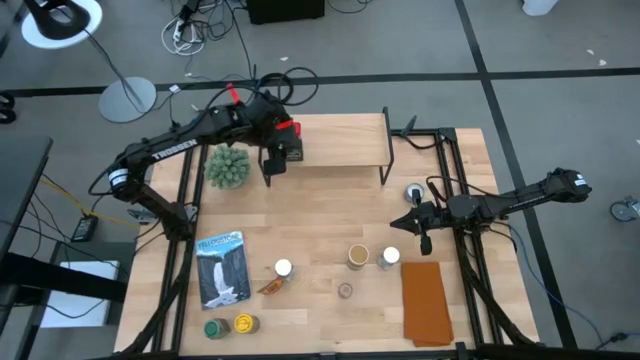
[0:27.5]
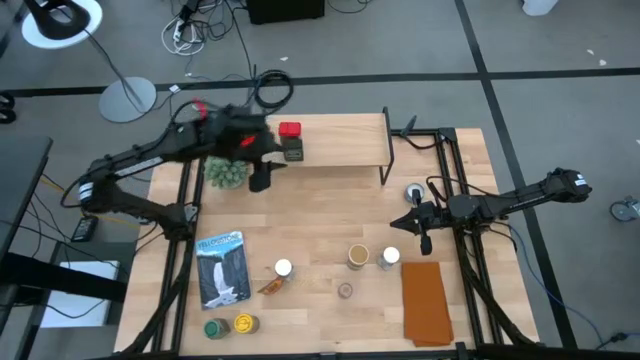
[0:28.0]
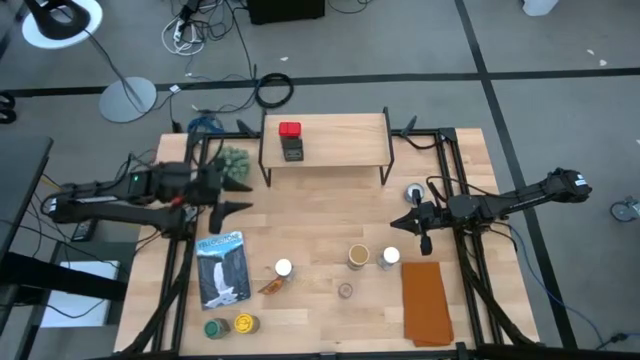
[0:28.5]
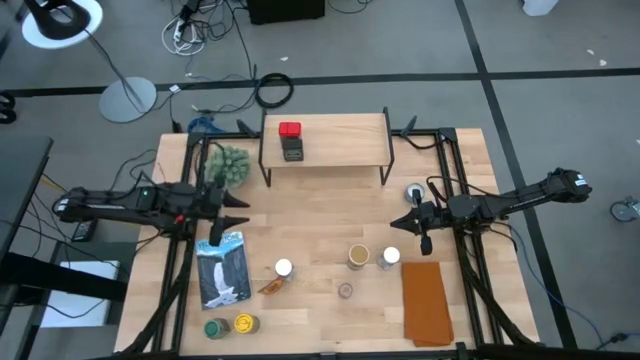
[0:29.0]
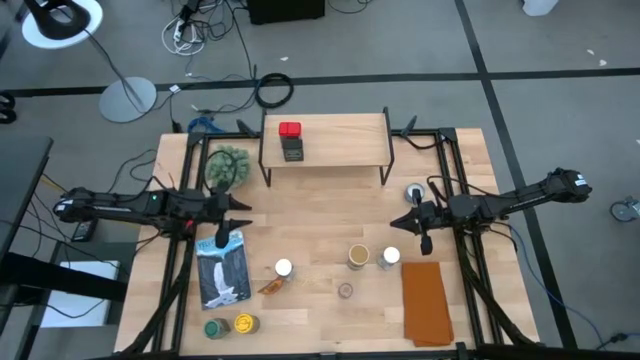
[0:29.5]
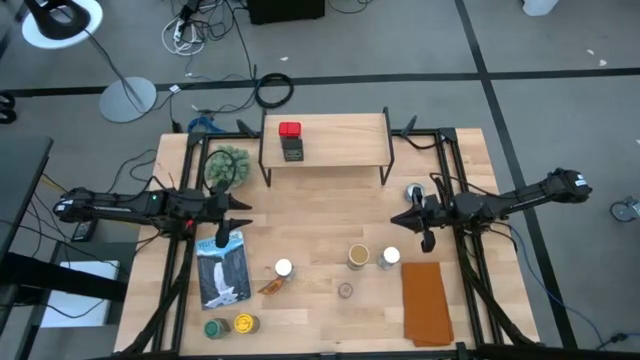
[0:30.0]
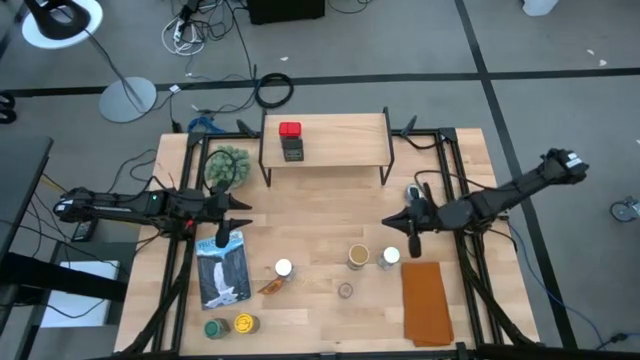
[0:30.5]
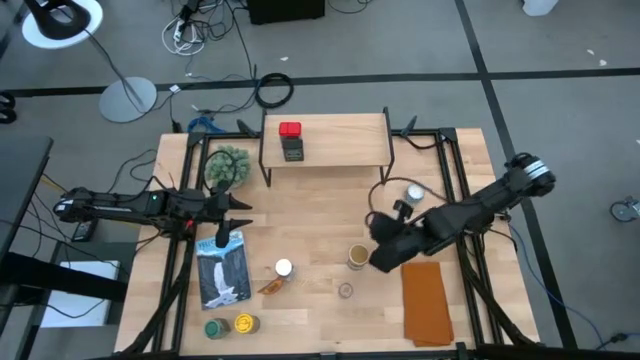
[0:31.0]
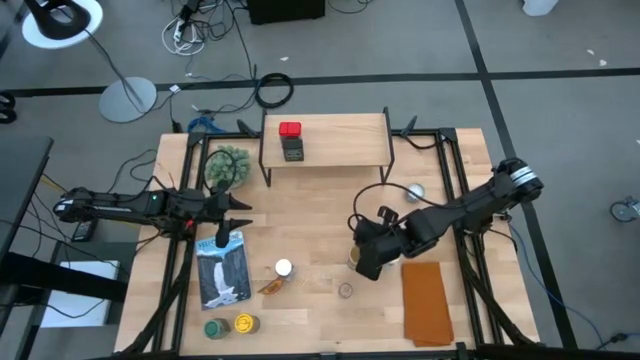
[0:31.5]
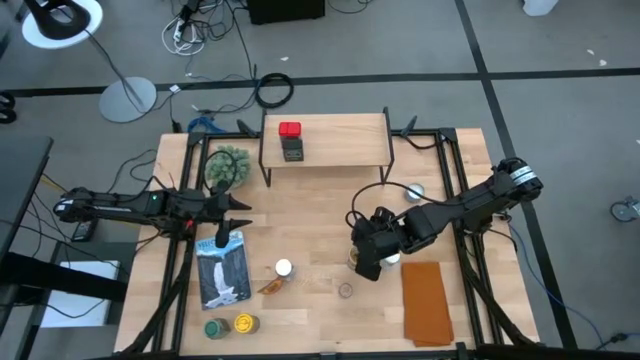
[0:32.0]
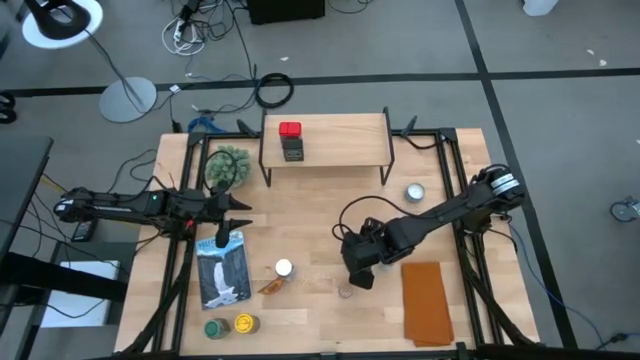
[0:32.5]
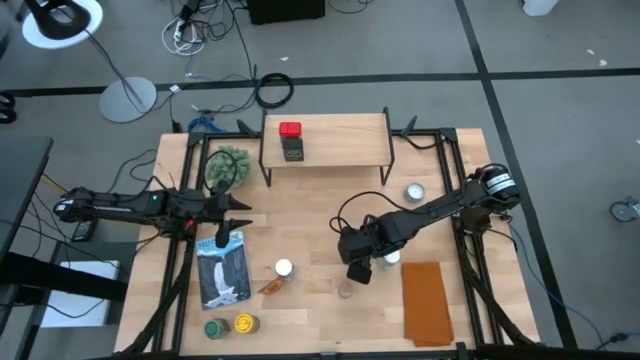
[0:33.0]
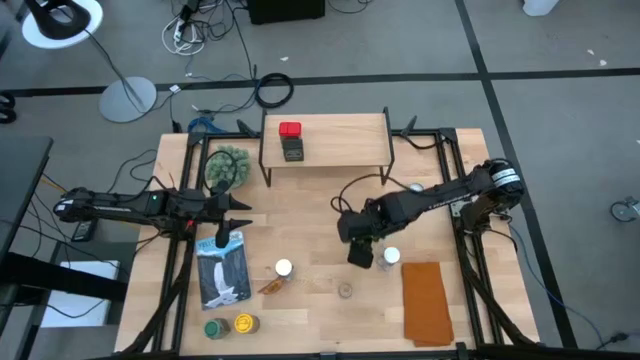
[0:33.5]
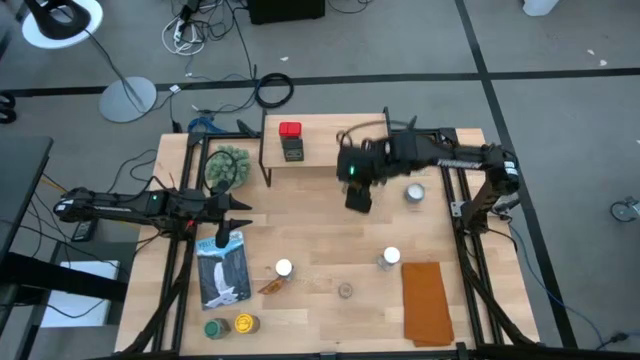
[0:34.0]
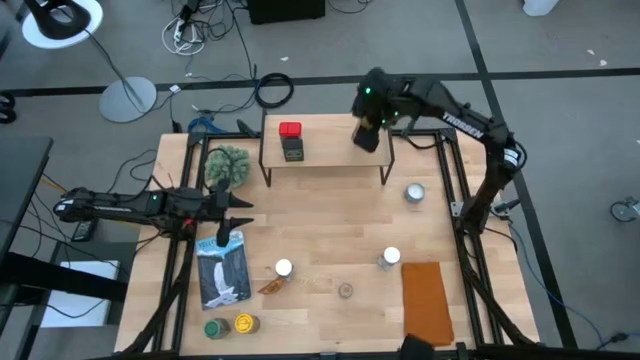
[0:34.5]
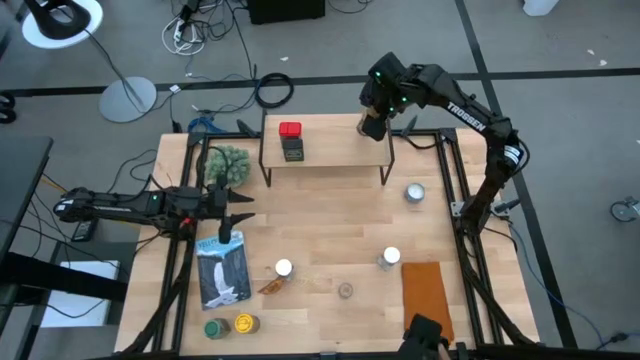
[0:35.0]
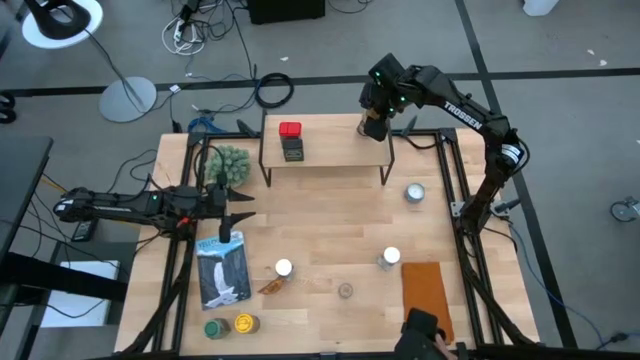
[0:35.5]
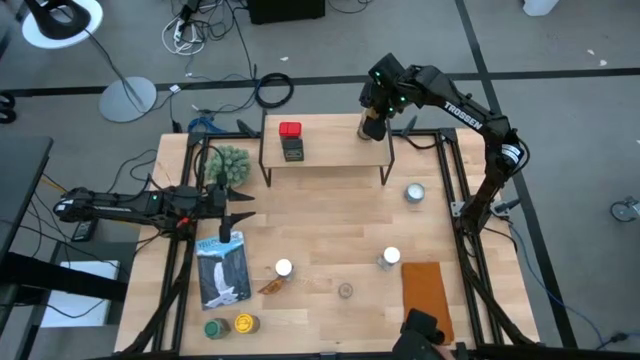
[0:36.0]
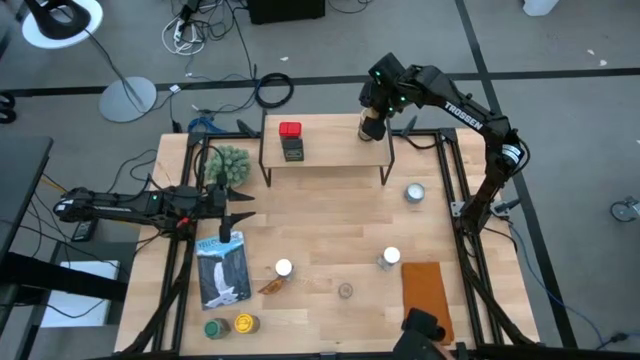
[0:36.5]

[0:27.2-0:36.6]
Task: Shelf spices
Put the gold seasoning bottle on the shelf

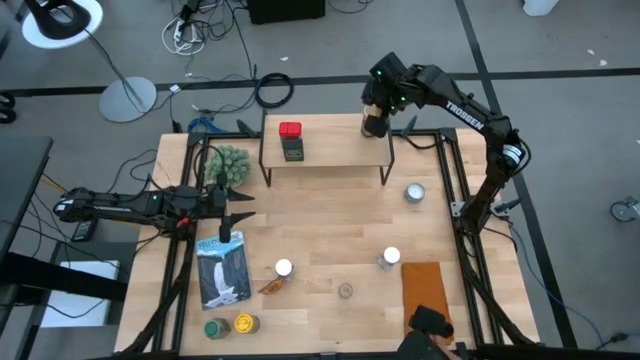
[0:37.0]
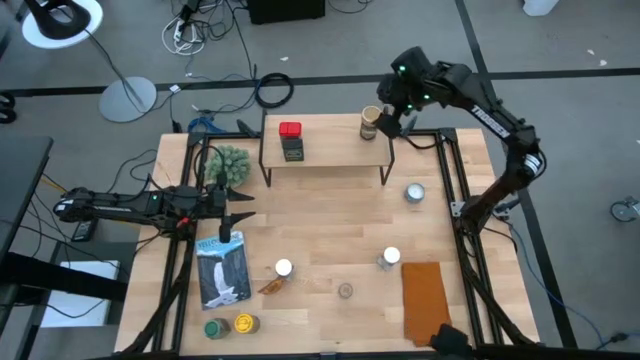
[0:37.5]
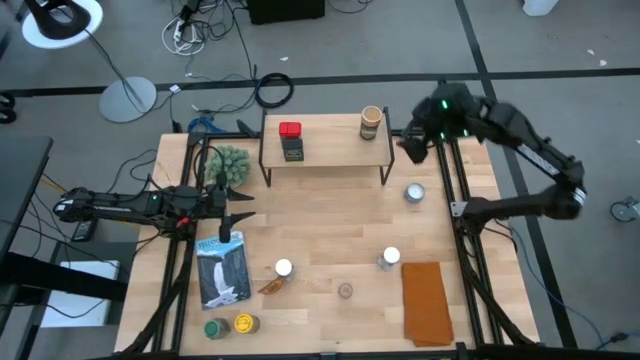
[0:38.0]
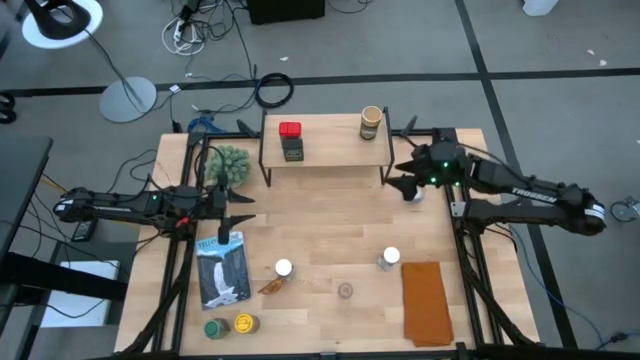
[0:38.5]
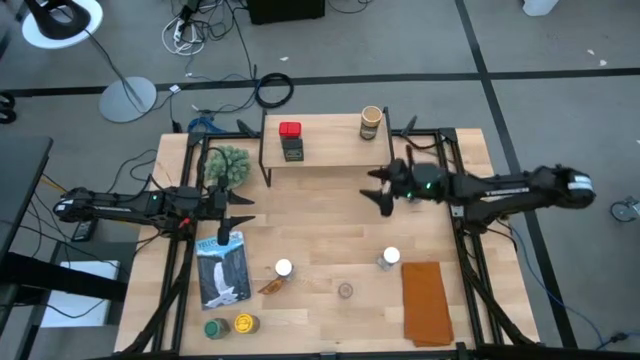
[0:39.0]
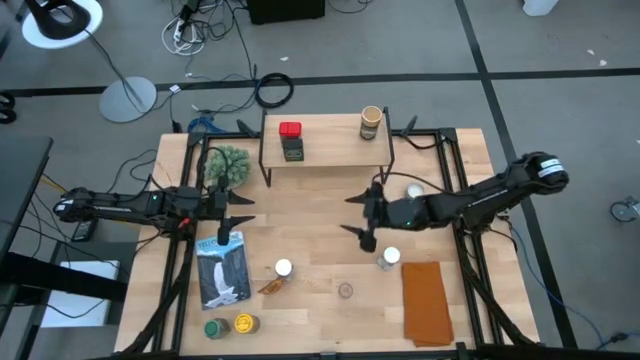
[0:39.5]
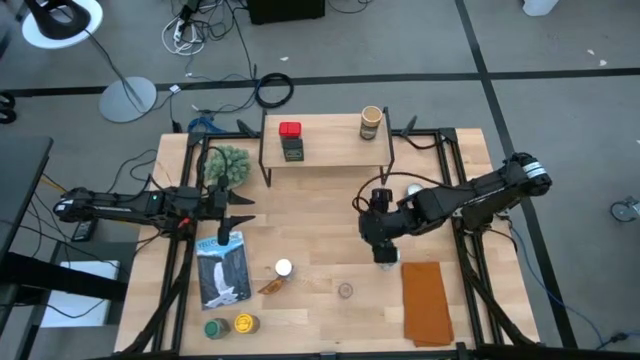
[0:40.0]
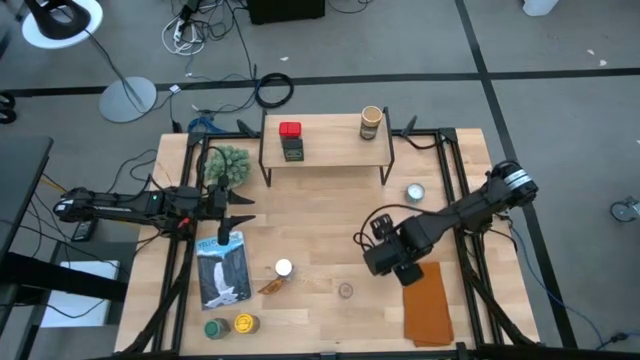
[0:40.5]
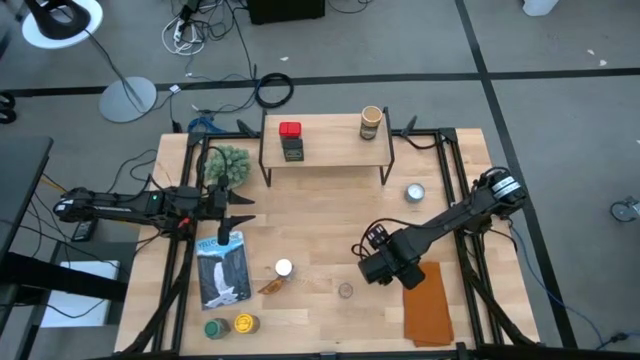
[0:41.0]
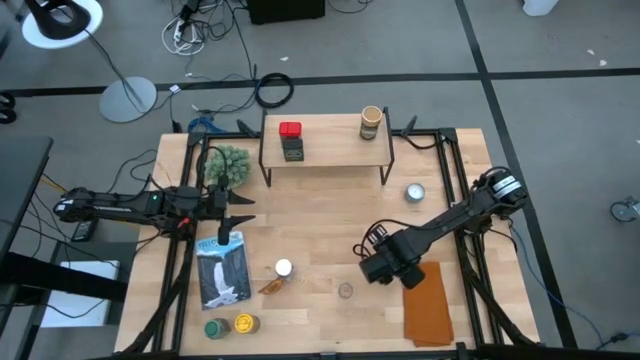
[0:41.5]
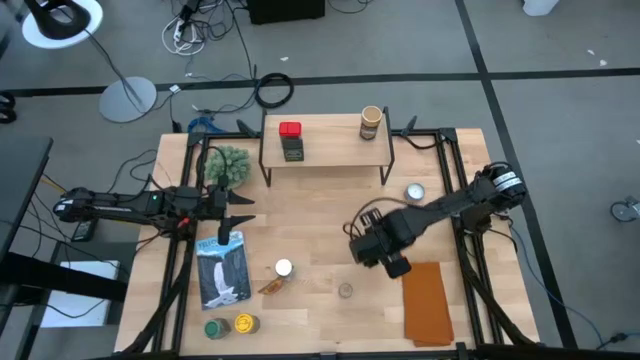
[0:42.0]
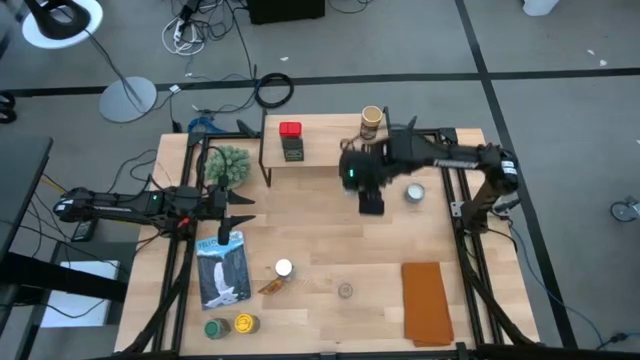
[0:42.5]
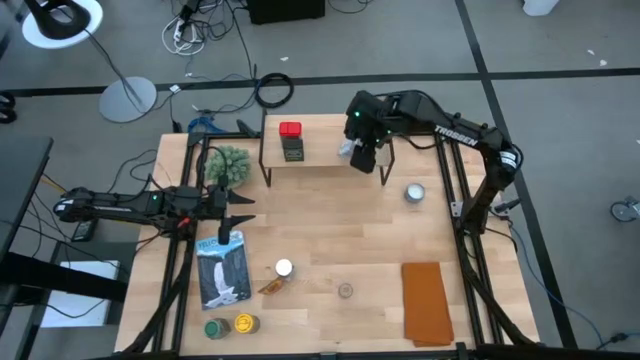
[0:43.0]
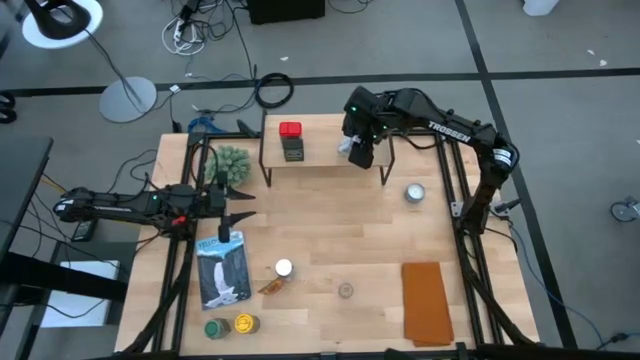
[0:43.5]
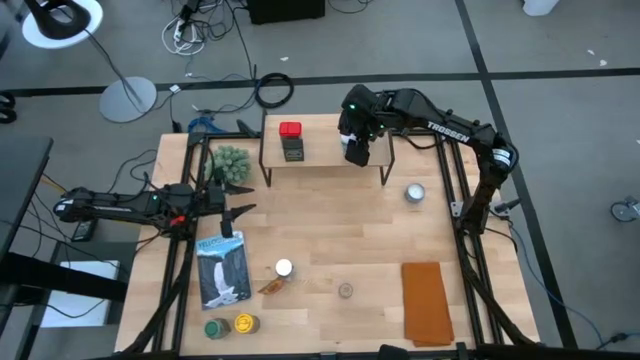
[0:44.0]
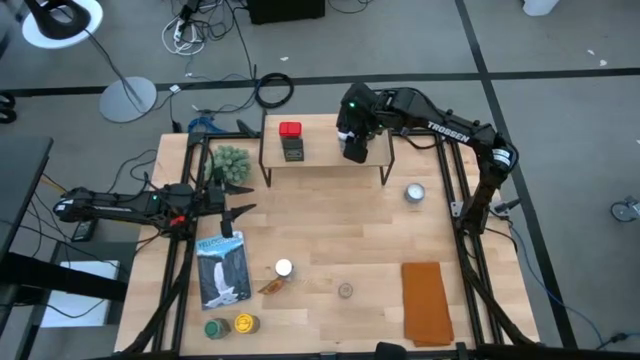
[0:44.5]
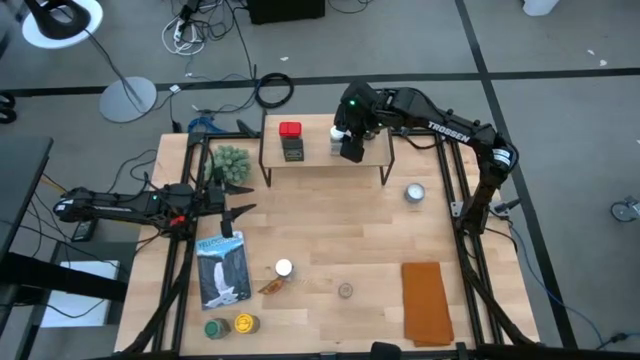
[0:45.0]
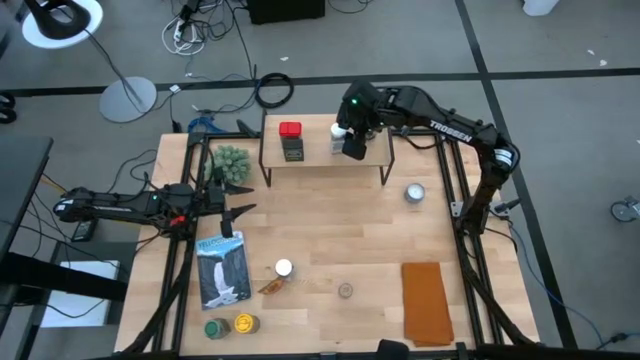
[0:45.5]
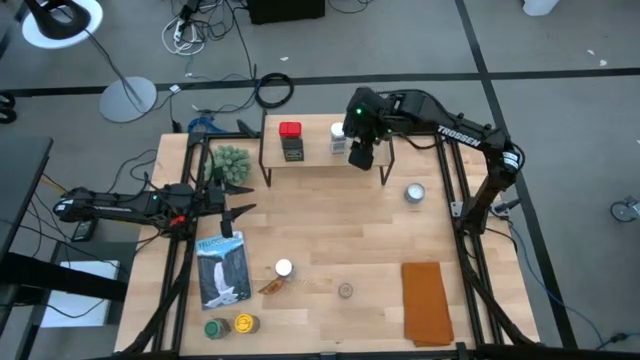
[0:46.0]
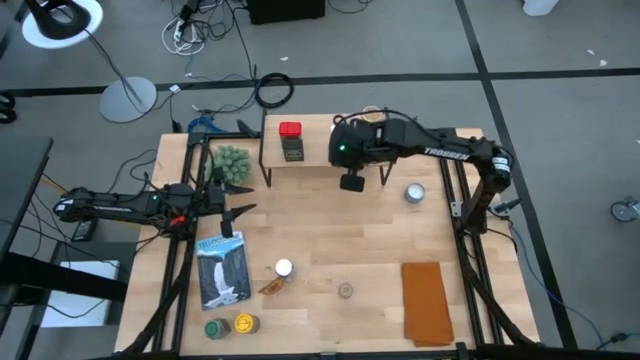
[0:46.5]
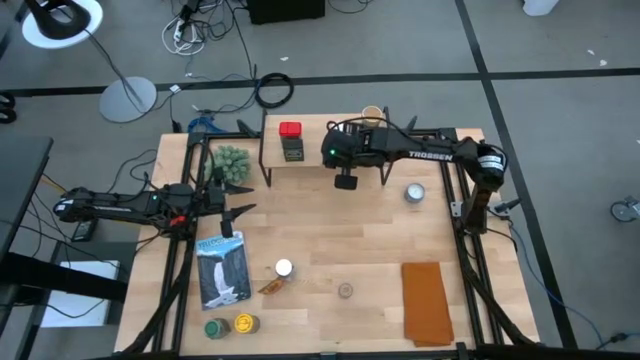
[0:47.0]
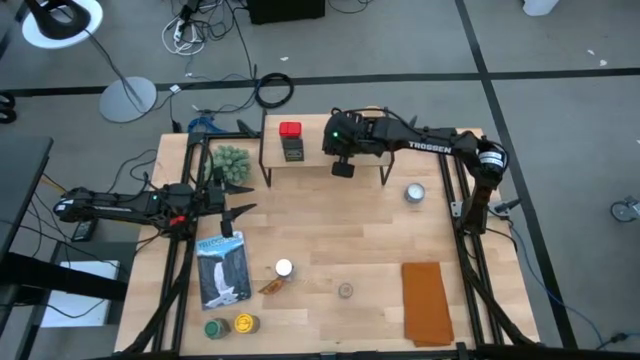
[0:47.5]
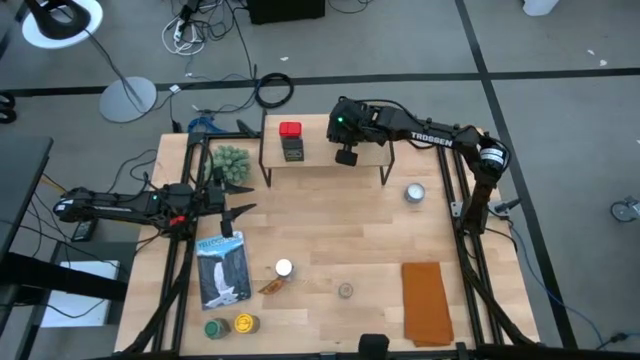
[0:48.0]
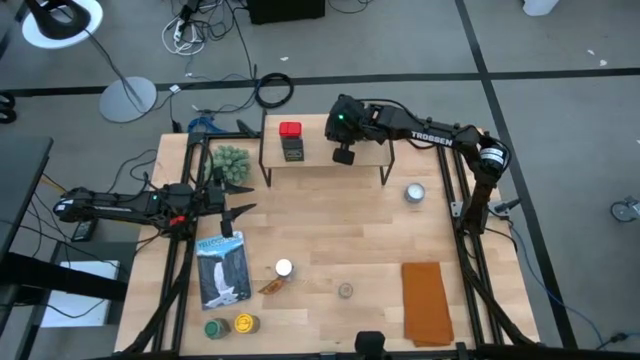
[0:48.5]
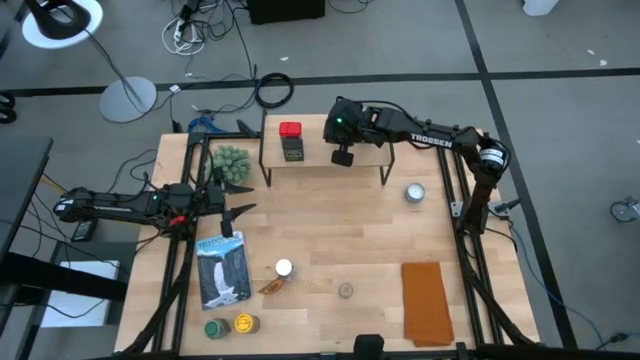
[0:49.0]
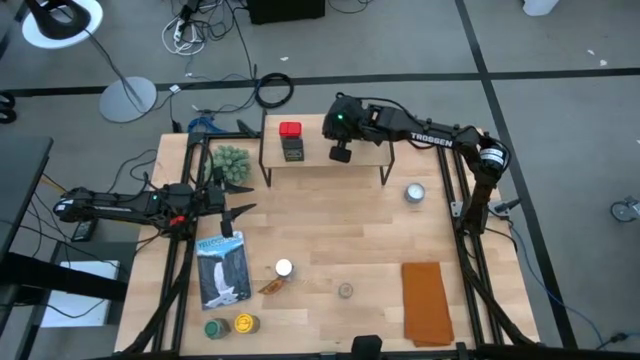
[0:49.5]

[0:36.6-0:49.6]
Put the right white seasoning bottle on the shelf
